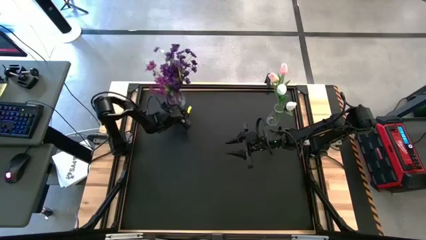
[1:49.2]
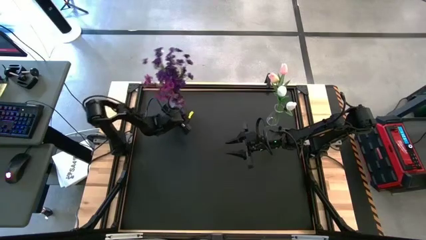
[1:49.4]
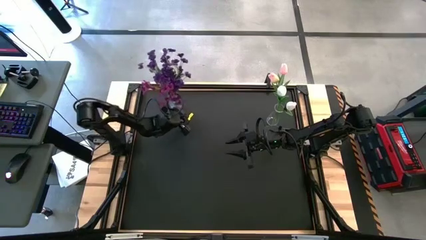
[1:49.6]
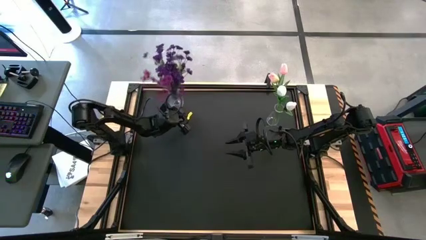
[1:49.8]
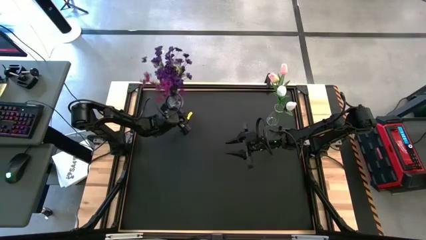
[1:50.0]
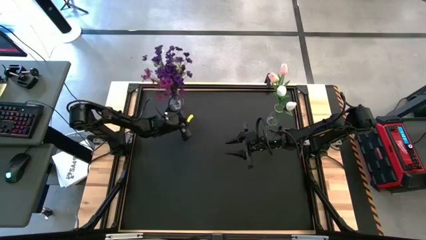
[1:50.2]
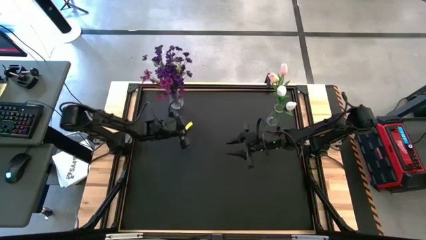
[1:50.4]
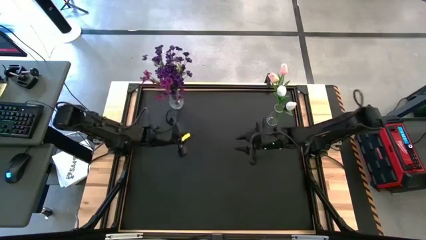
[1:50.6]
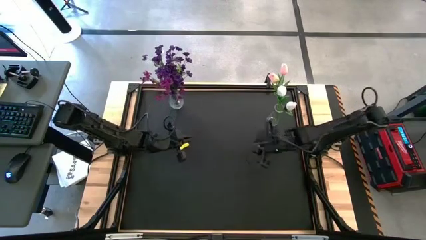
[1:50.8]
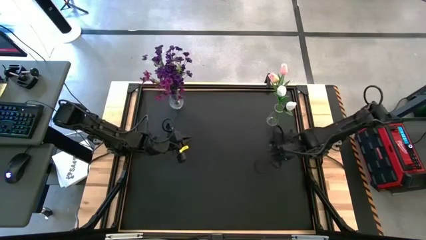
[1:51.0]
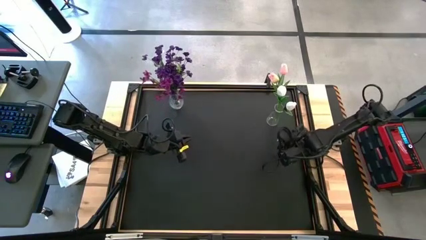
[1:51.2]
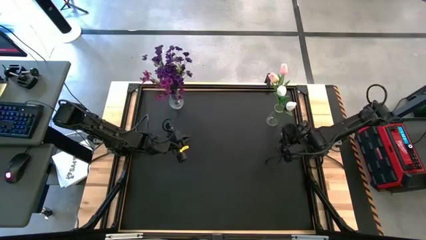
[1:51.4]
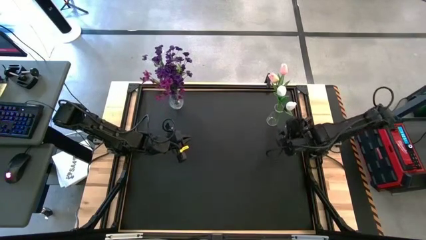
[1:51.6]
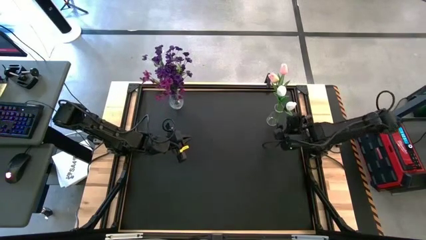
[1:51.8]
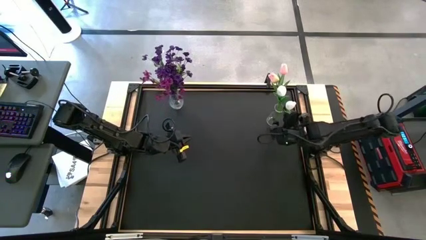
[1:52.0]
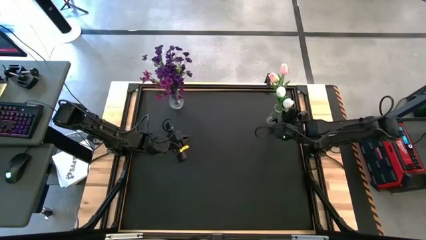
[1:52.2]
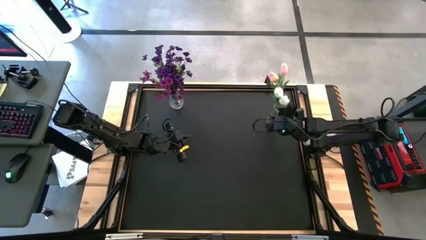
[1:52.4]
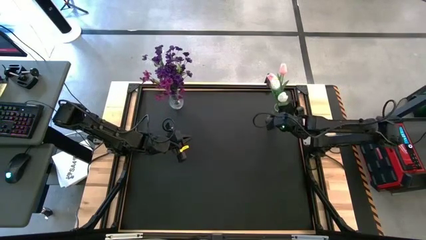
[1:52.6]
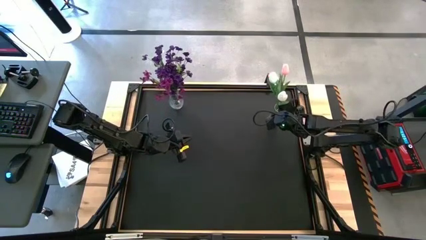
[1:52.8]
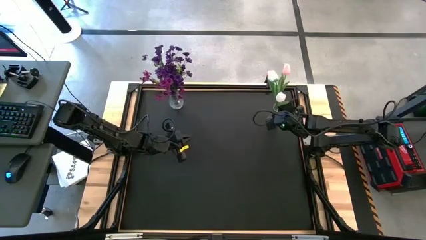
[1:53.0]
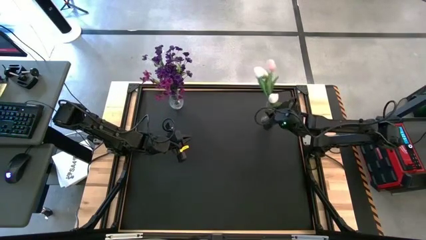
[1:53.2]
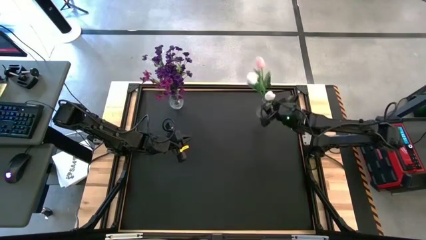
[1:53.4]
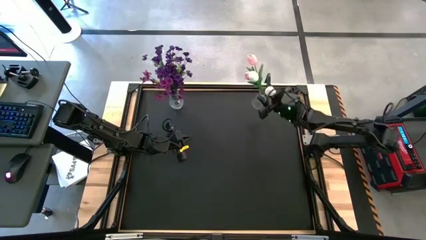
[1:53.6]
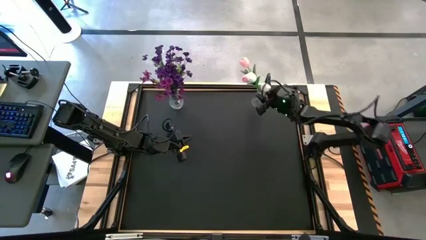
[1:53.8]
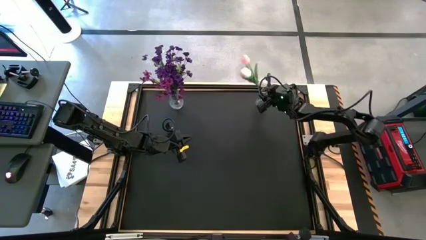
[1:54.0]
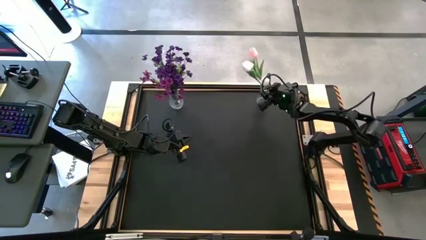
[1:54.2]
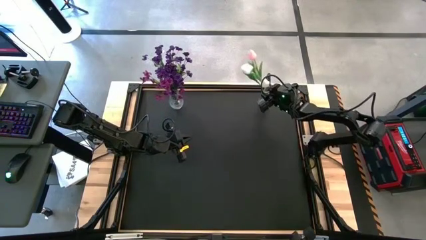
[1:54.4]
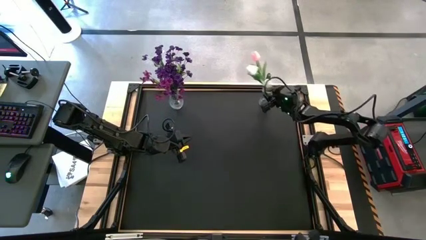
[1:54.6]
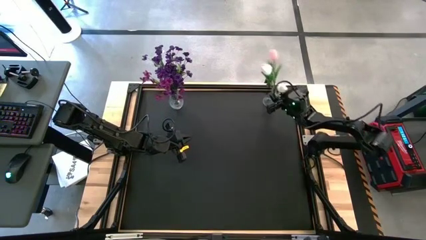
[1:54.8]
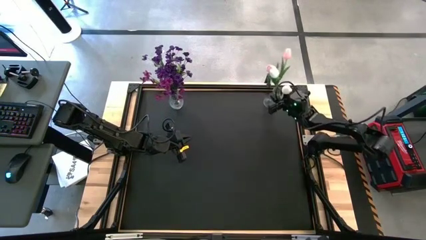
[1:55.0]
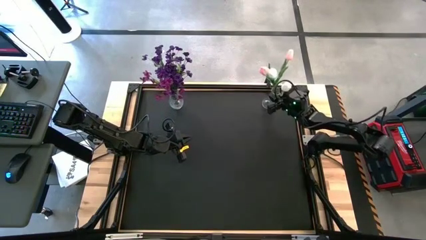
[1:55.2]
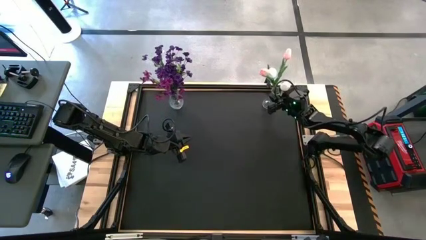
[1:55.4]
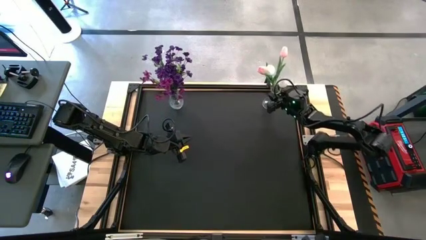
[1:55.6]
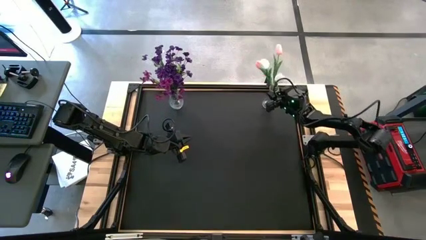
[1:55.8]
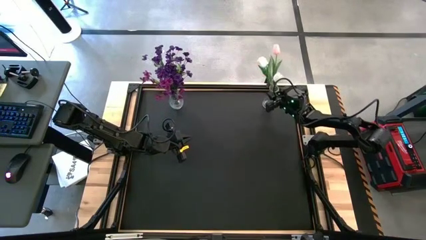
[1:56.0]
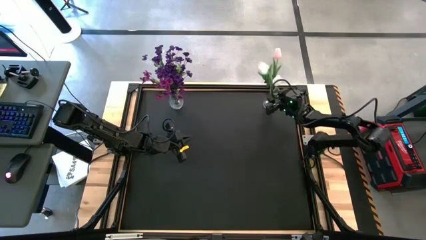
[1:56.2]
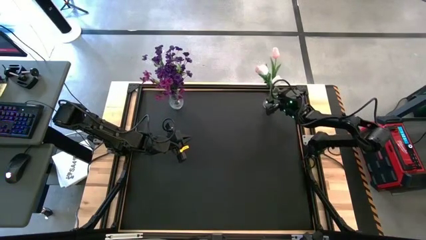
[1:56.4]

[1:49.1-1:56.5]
Task: Sort flowers into vase by color
Adjust the right transparent vase

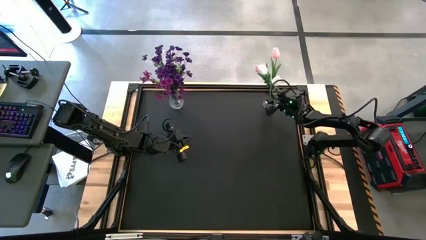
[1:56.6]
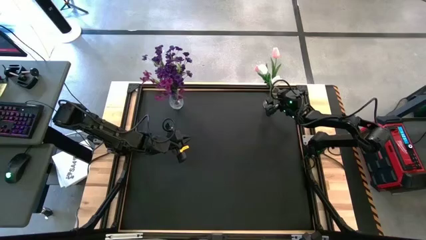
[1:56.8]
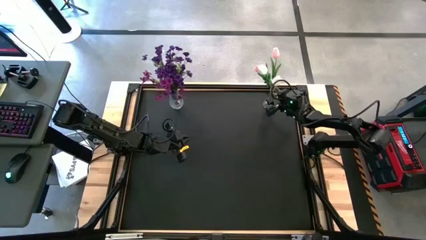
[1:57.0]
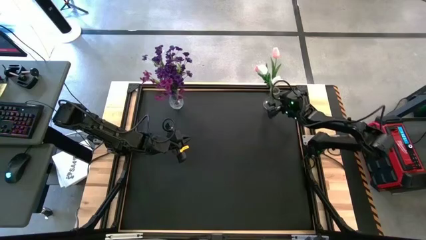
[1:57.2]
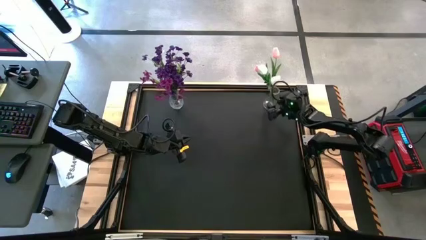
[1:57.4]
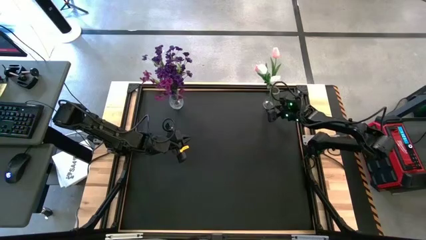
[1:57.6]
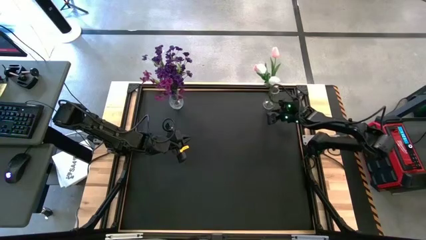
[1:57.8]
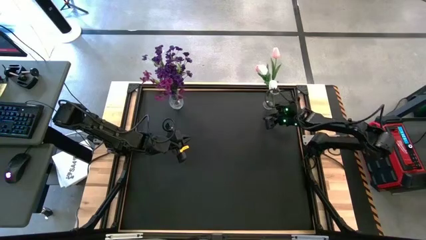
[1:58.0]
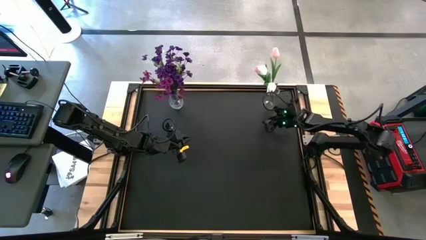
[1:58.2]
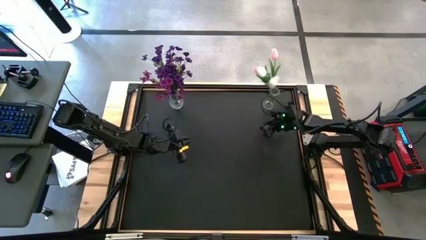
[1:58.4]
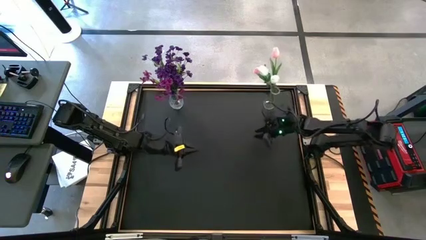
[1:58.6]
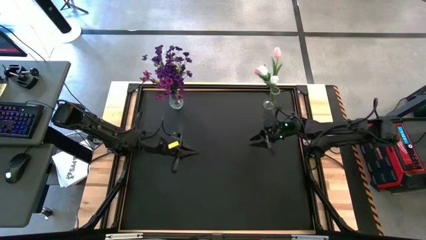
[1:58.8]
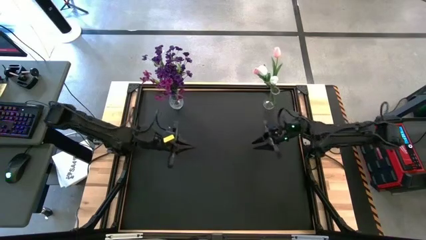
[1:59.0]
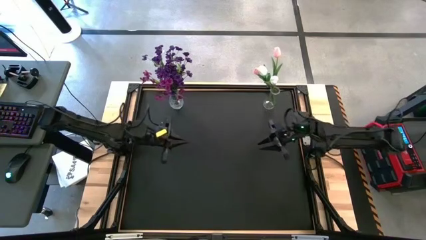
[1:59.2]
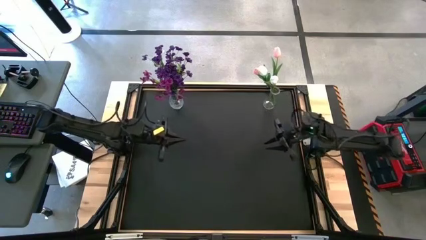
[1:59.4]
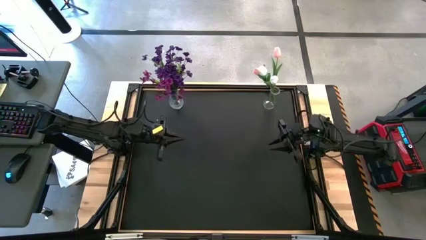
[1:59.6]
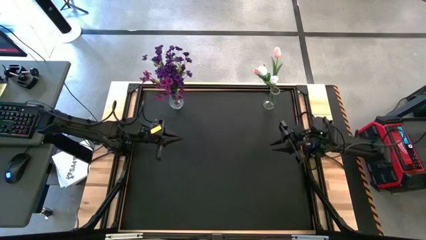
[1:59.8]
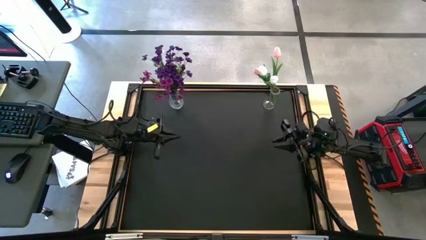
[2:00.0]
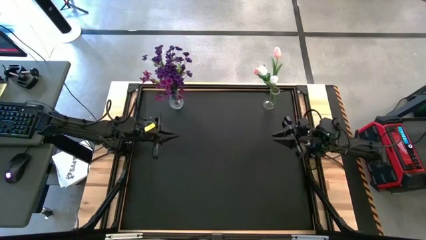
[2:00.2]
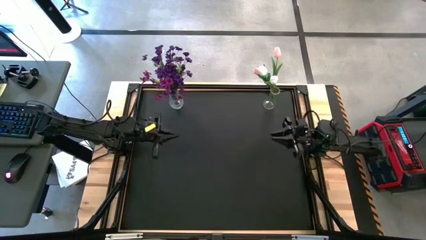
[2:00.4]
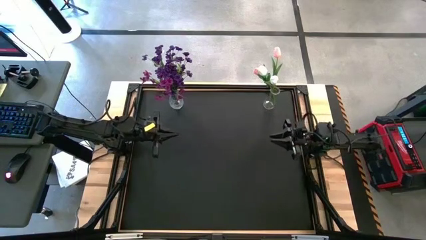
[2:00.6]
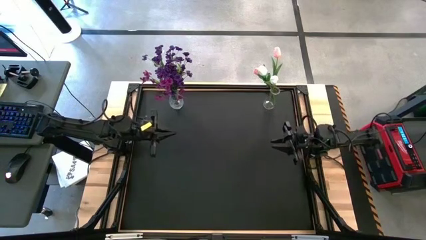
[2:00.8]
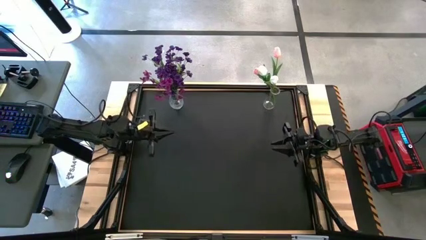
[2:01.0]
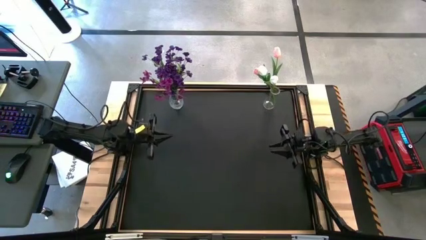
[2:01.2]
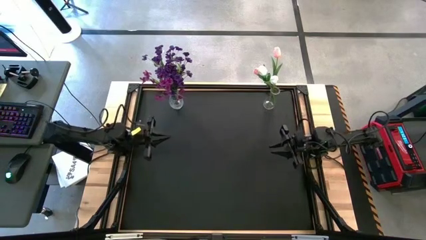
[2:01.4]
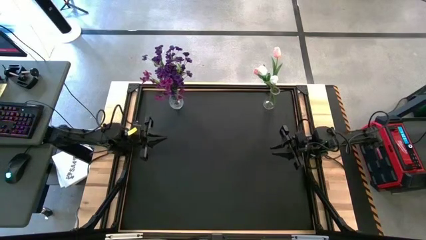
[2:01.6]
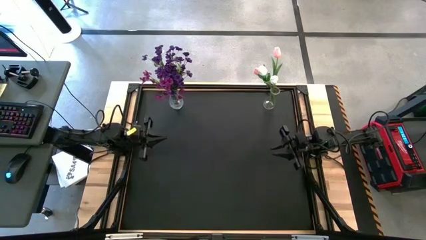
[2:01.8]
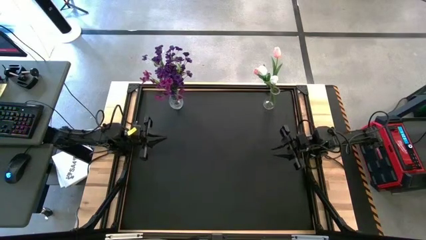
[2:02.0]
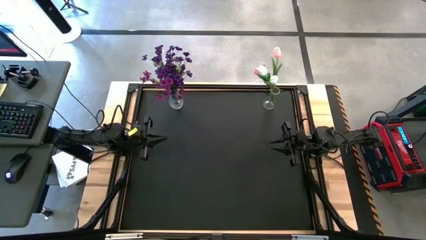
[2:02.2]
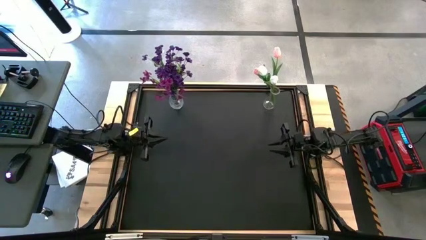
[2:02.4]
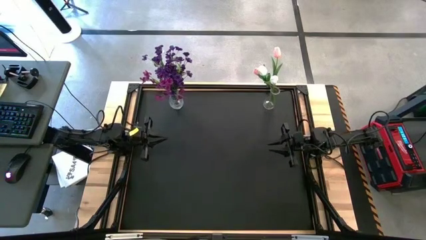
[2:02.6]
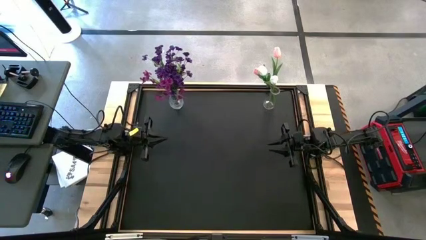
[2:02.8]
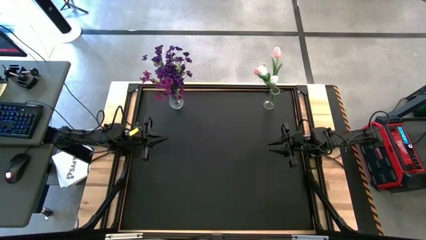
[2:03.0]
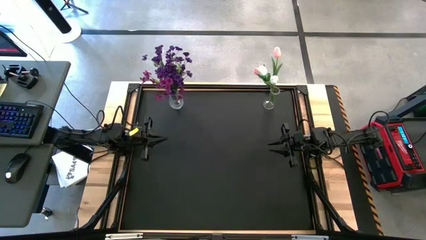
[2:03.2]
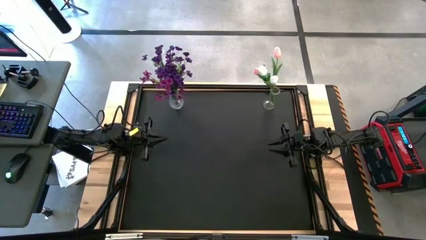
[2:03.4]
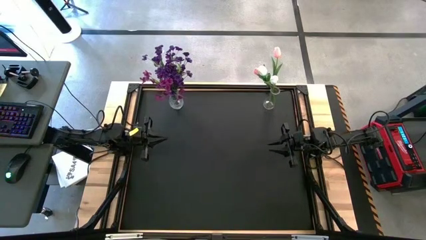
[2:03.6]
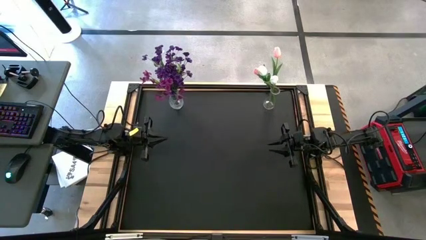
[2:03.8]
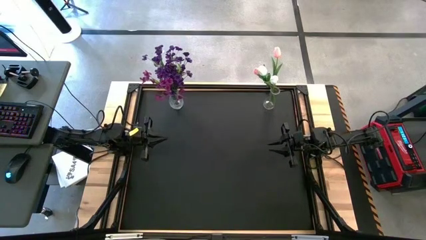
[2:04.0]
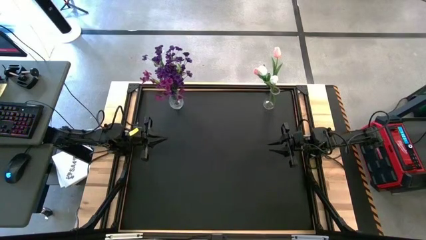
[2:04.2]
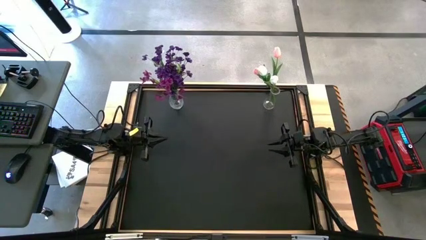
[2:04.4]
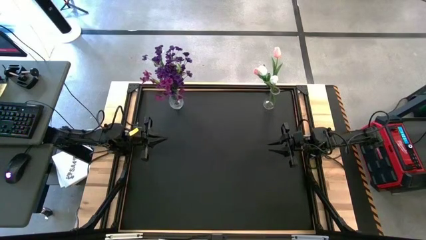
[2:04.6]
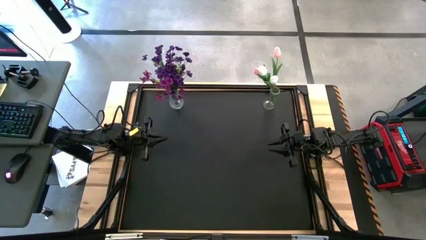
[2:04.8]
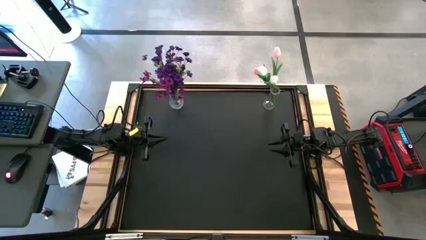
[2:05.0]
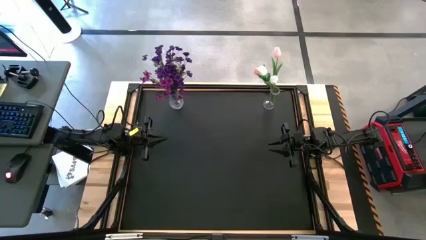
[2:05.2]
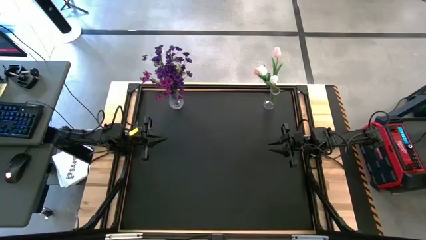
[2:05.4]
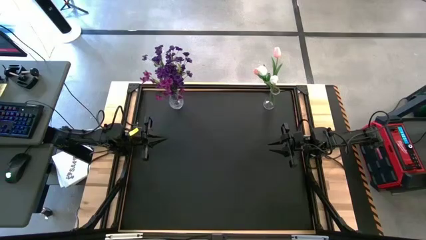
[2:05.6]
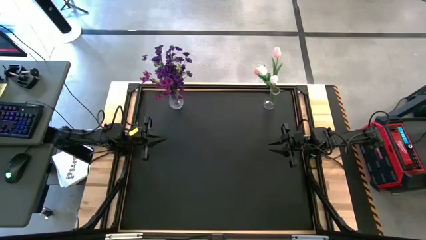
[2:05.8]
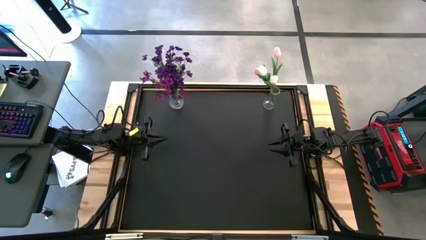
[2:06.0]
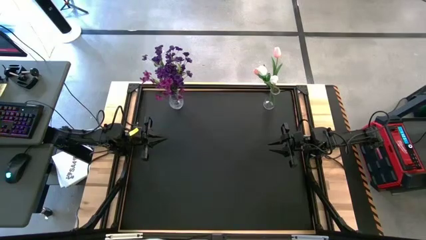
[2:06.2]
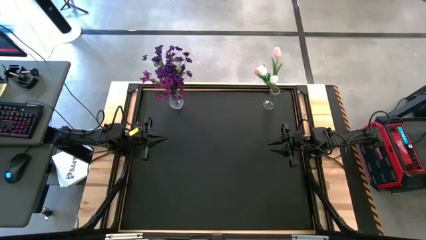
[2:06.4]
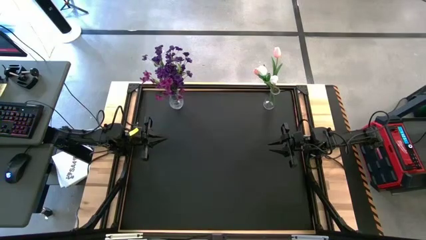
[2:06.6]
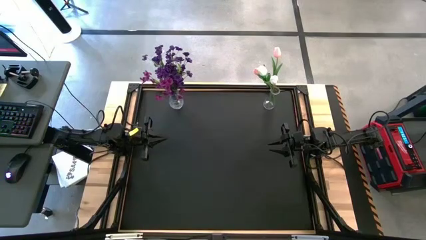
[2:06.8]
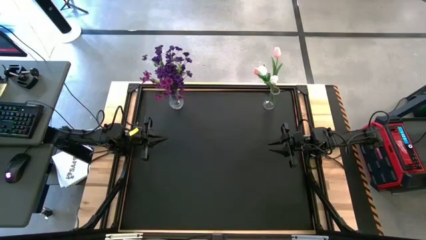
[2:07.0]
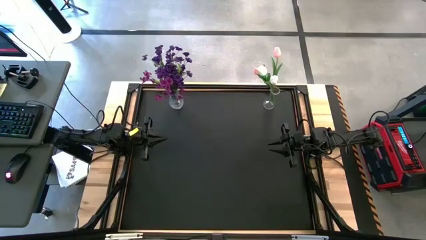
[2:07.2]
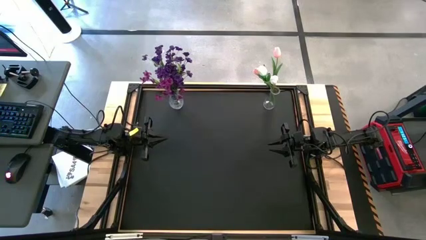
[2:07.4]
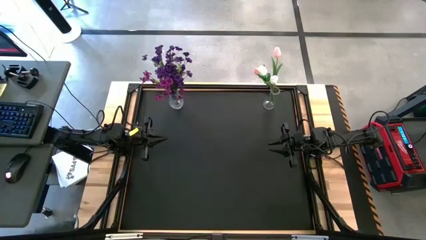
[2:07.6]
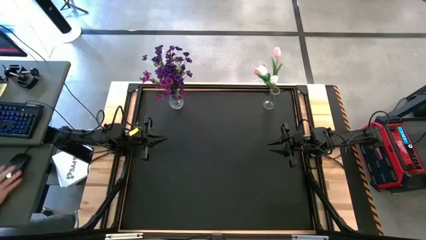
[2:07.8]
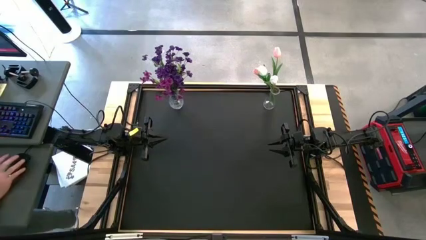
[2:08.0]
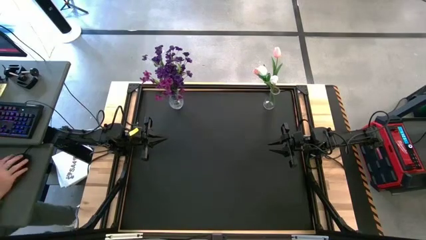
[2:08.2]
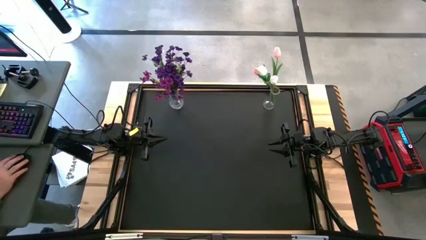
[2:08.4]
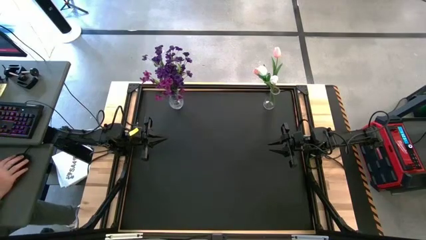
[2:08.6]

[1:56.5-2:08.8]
Return to Home Position
